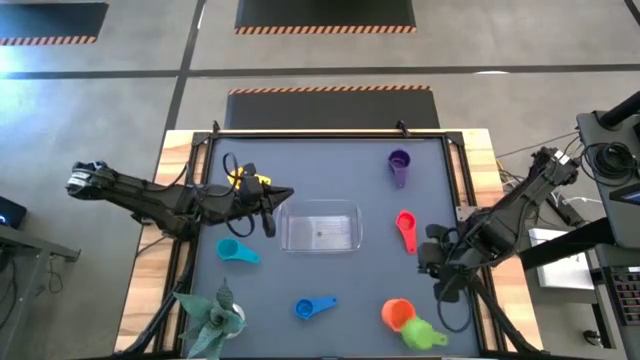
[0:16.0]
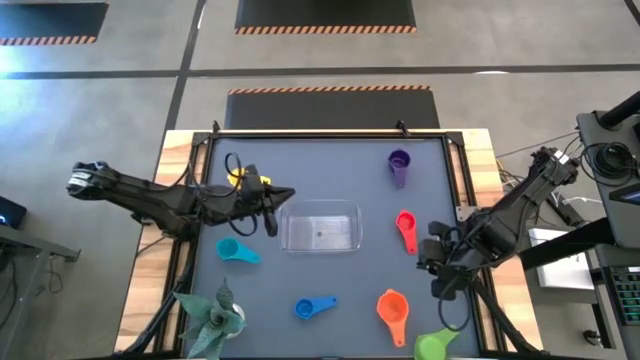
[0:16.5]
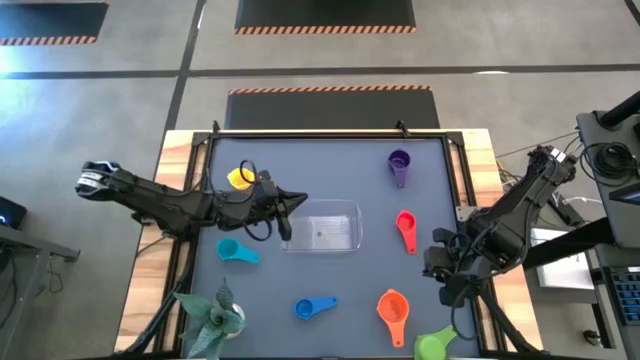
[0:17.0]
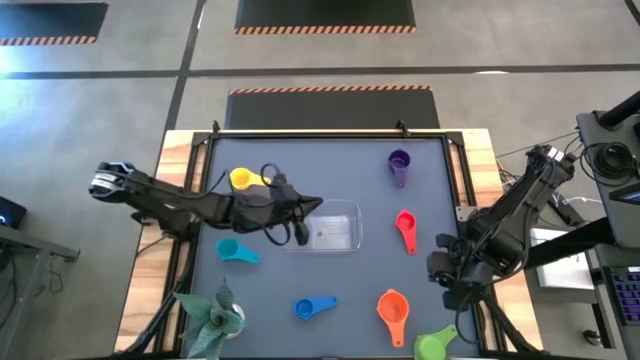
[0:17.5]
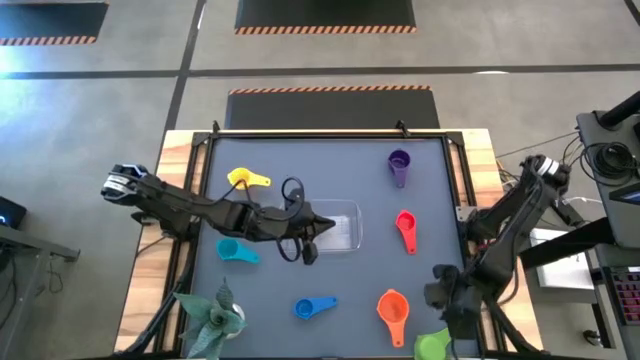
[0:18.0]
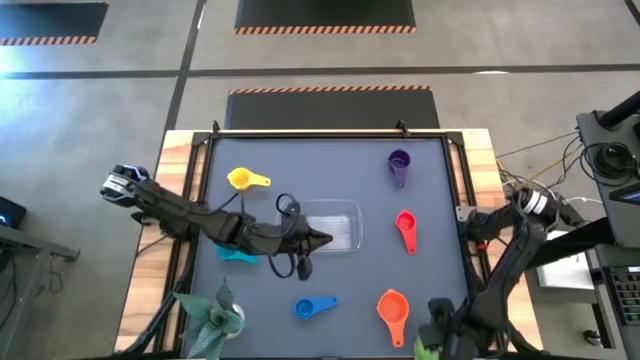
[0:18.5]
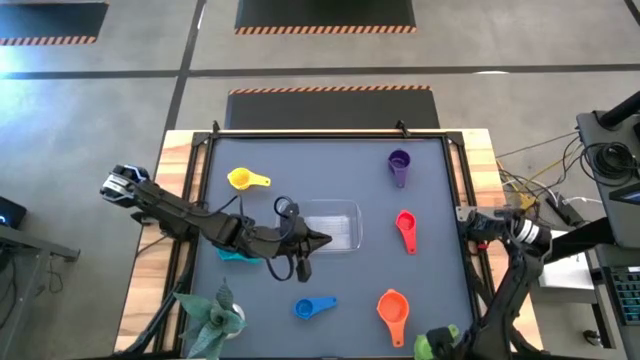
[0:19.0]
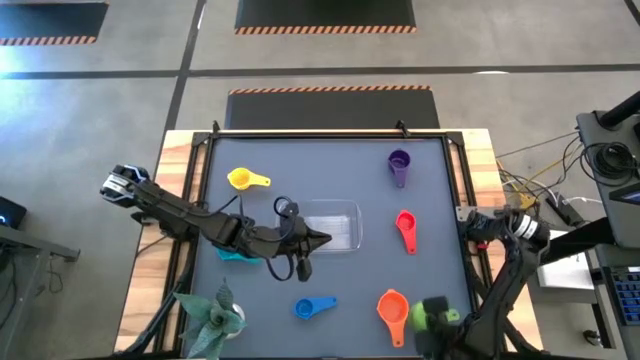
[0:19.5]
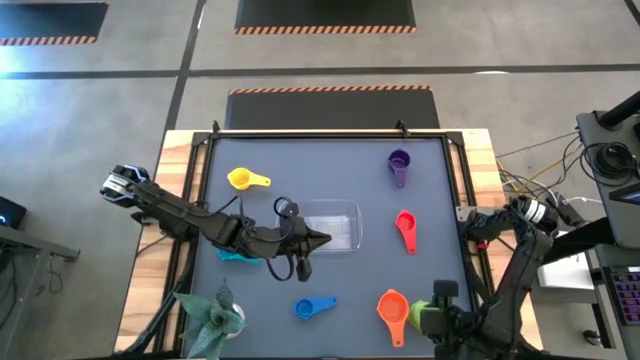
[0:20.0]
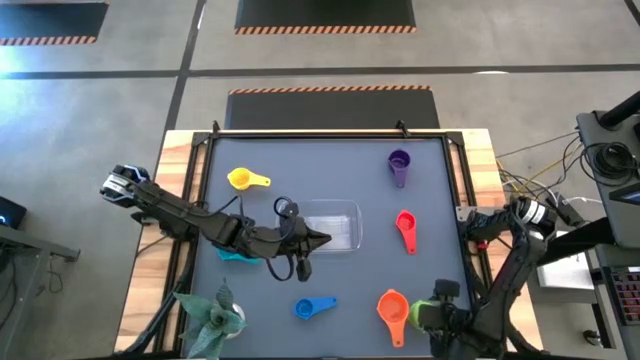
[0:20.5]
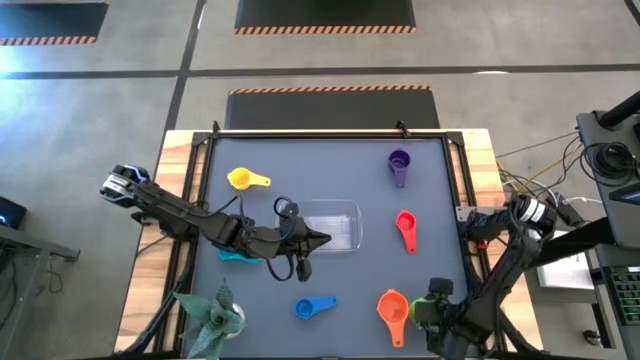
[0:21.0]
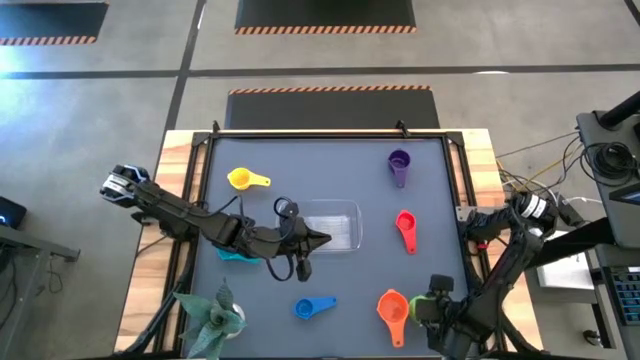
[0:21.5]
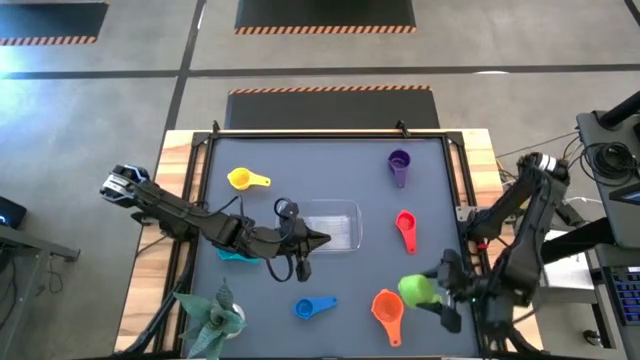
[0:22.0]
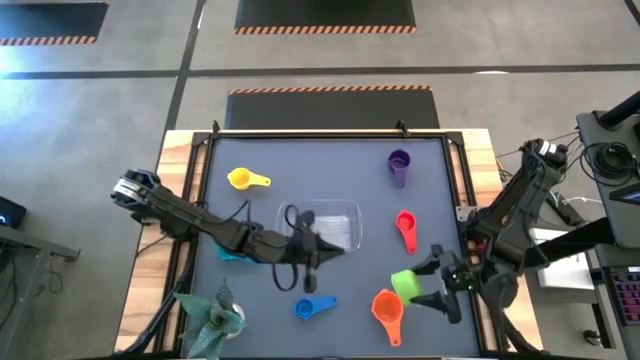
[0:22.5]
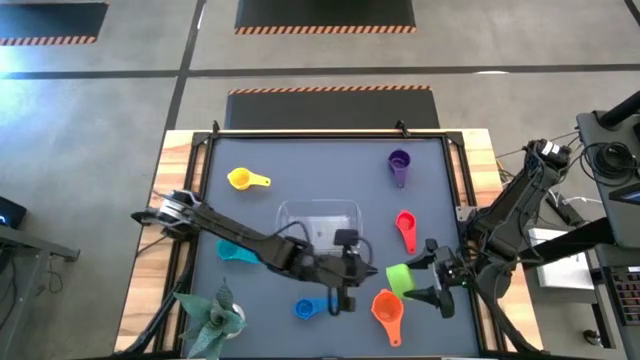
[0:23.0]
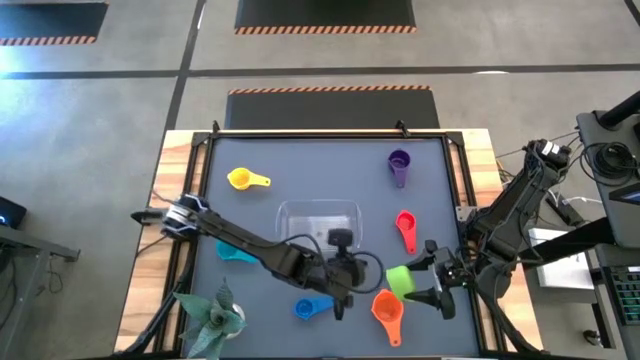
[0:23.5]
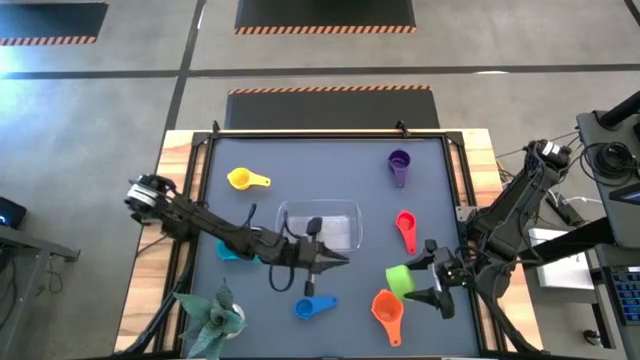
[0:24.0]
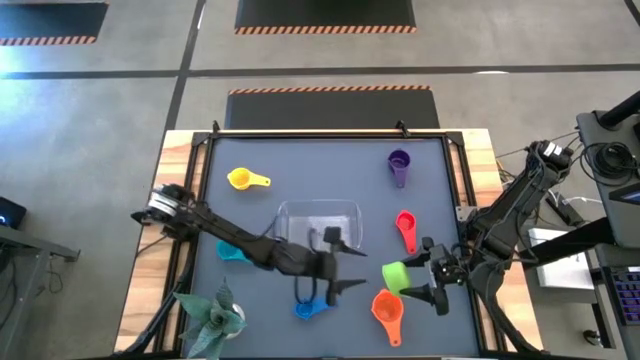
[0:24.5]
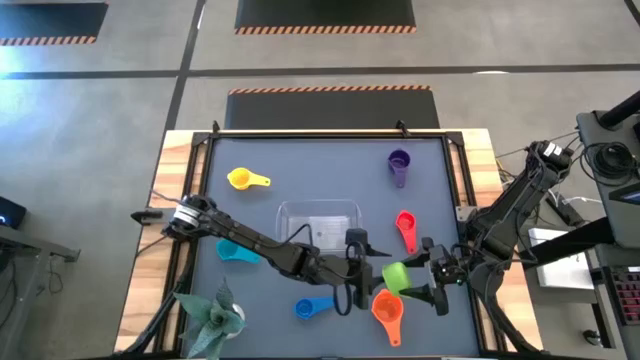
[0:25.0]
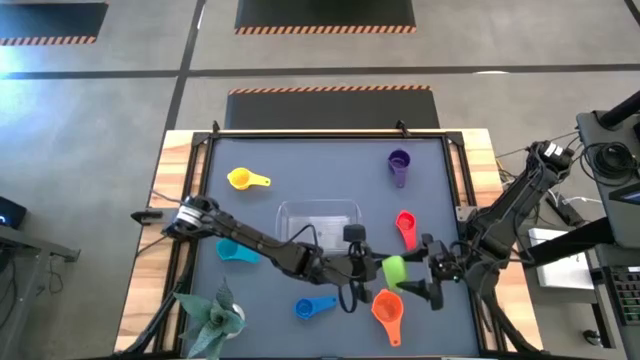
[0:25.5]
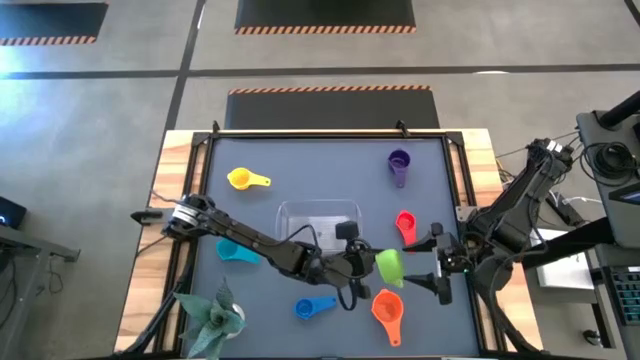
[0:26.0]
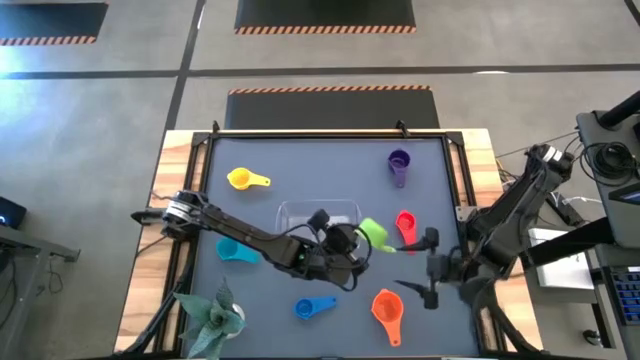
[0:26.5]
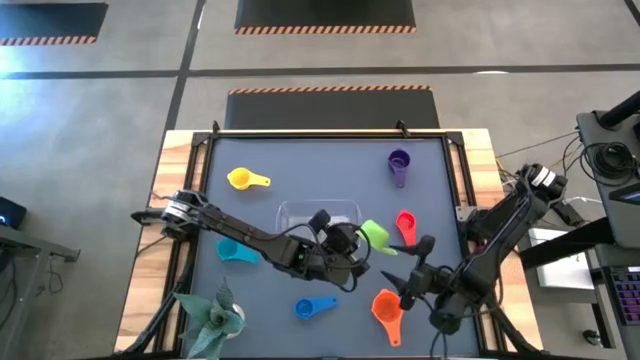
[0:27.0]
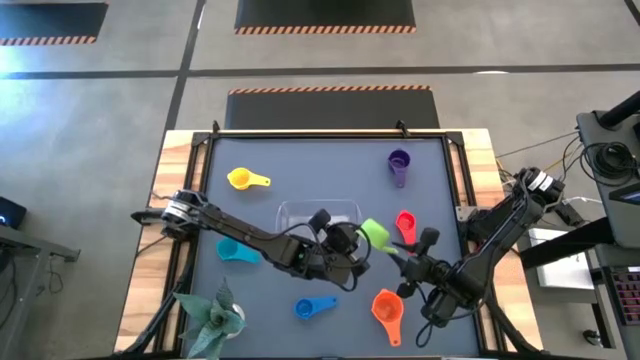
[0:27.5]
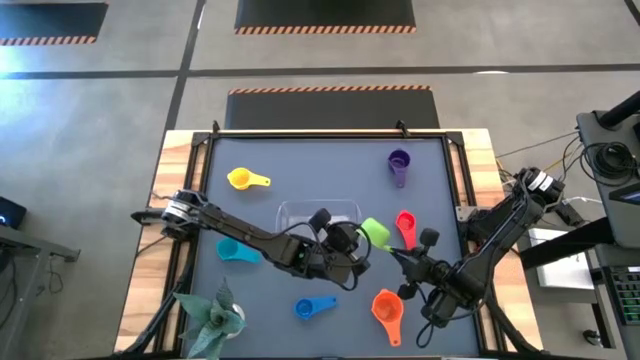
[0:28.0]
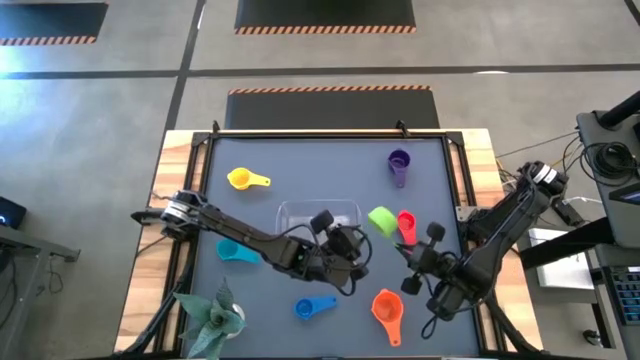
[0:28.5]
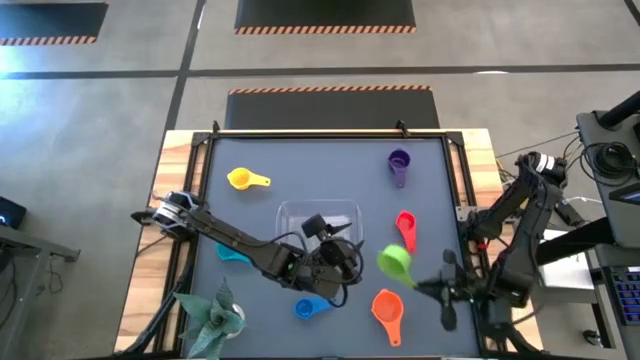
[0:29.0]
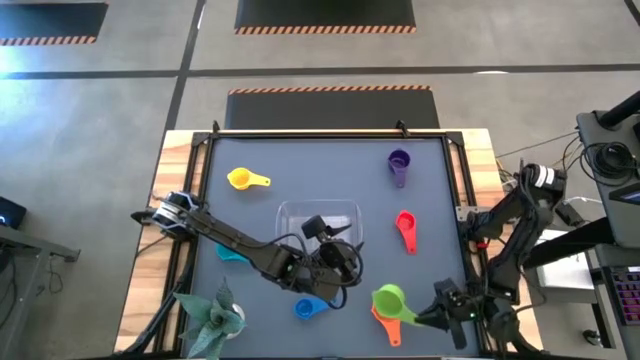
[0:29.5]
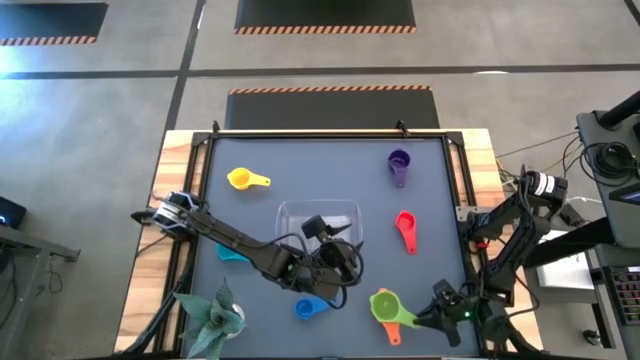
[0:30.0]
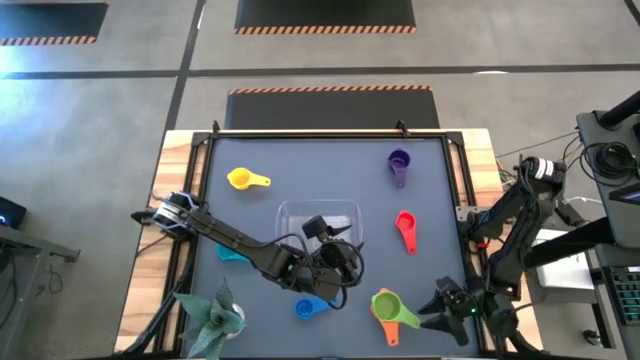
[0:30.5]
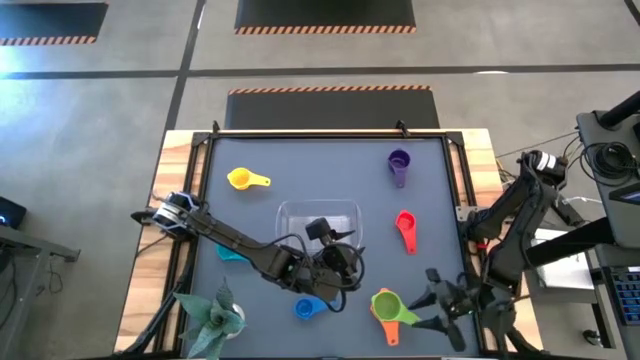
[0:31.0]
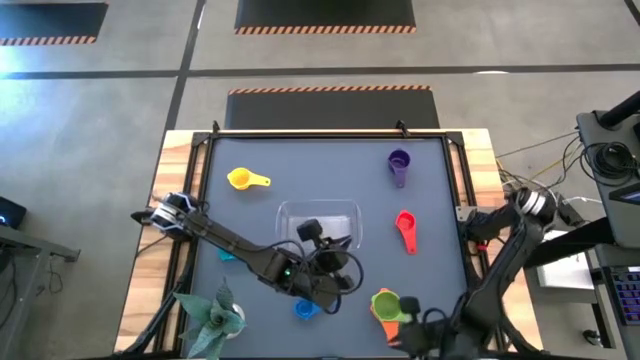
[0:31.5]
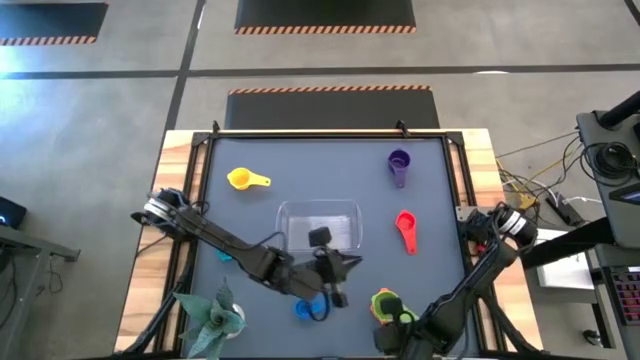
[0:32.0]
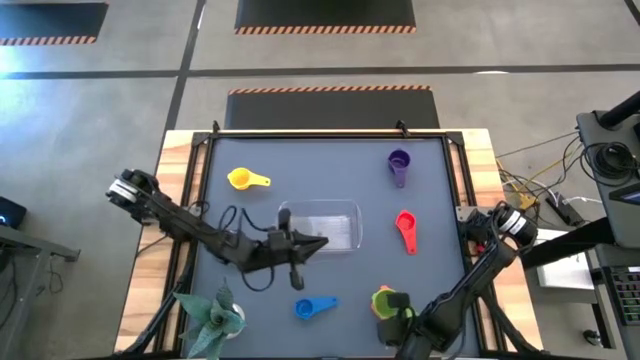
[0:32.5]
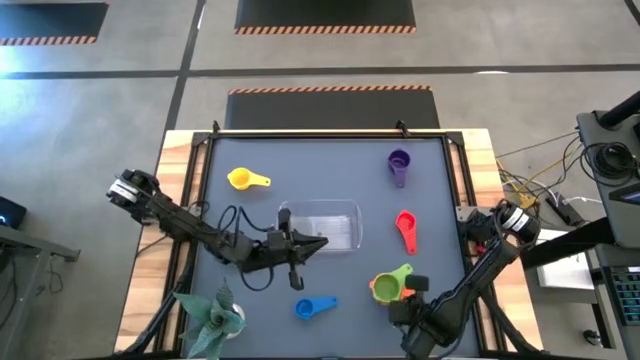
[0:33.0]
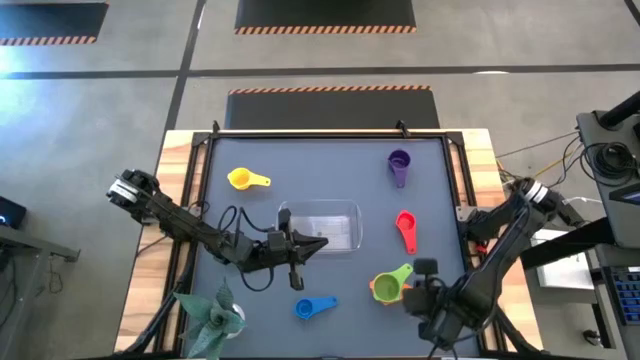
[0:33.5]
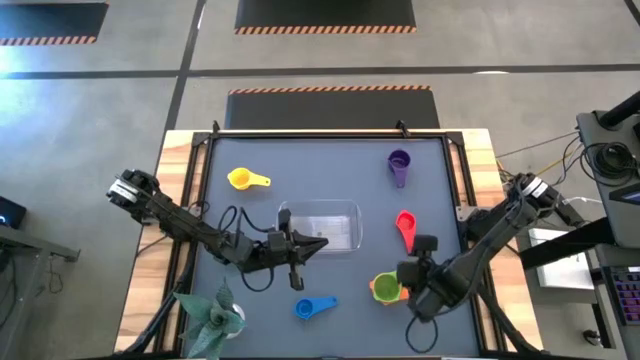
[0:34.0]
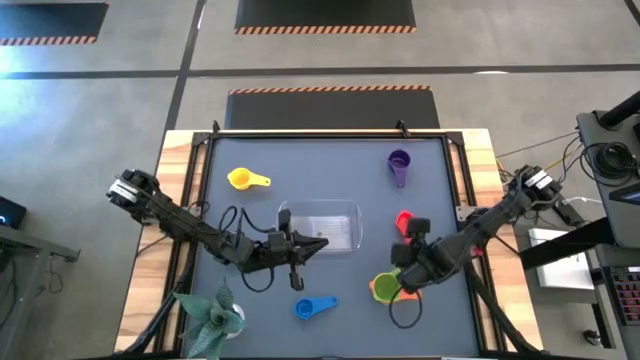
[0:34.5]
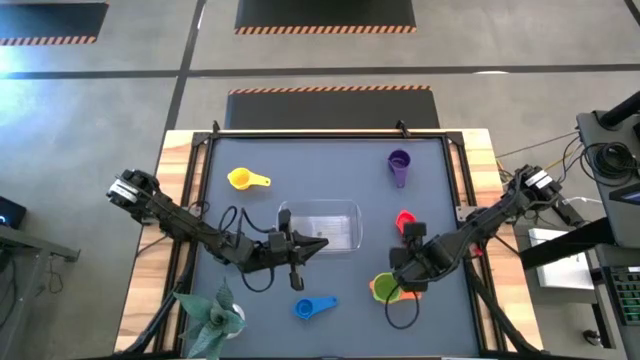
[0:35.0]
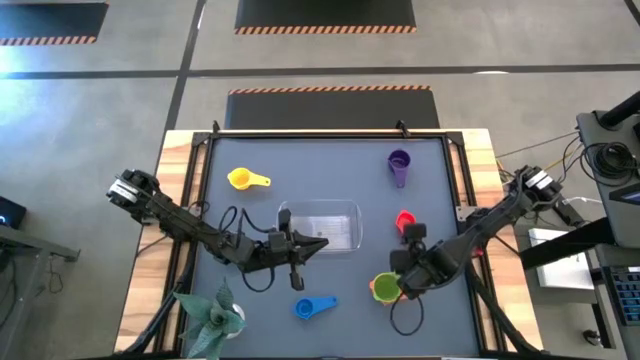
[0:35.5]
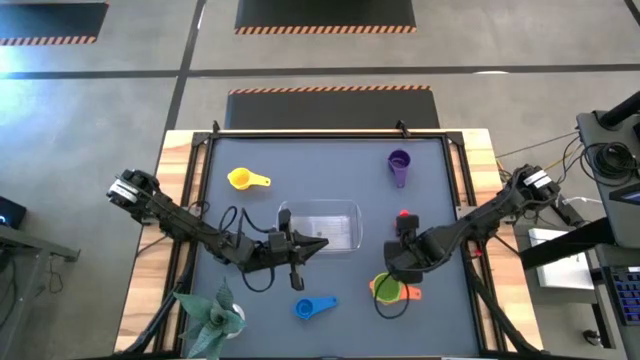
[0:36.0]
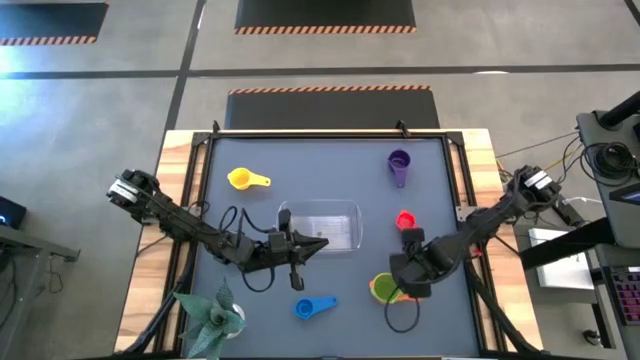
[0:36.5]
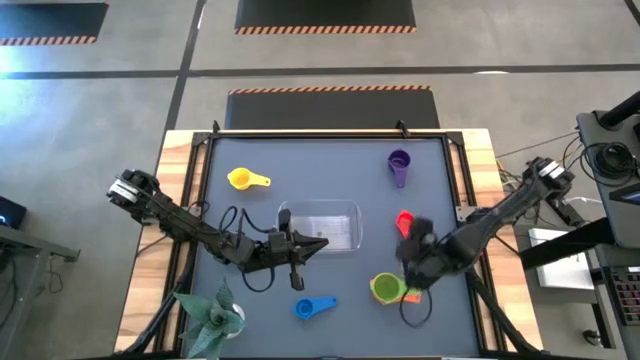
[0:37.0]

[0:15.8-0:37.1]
Task: Nest measuring cups in basket
Stack the green measuring cup on top of the orange measuring cup
